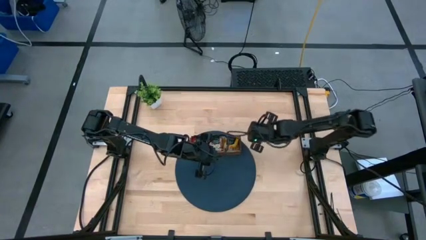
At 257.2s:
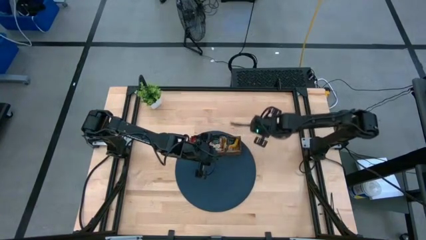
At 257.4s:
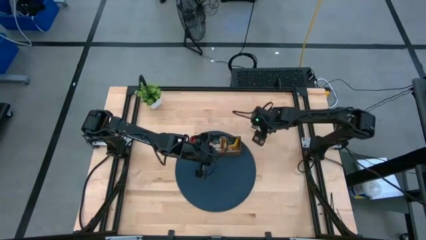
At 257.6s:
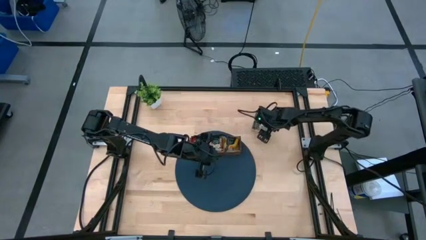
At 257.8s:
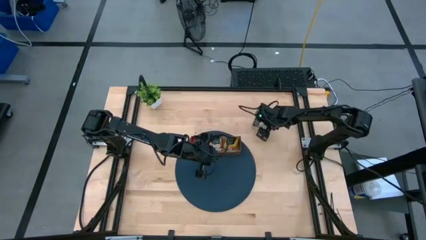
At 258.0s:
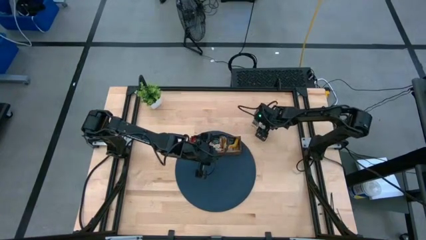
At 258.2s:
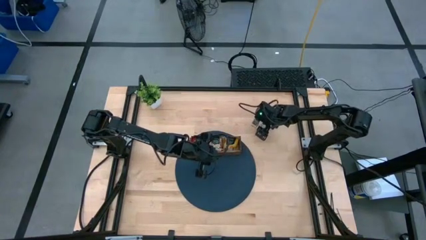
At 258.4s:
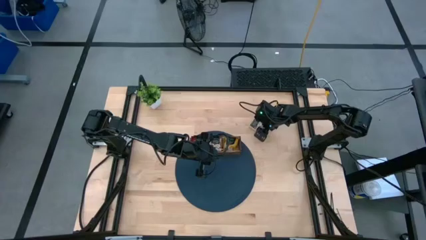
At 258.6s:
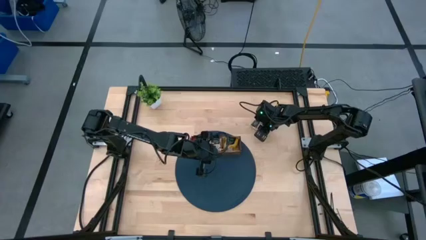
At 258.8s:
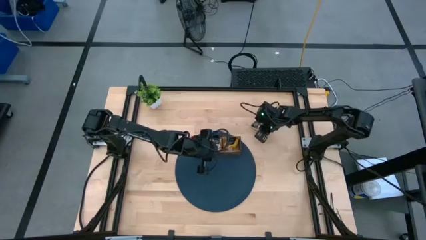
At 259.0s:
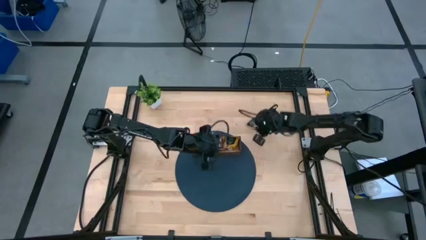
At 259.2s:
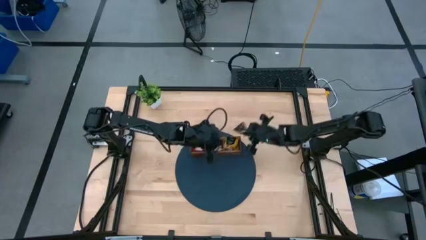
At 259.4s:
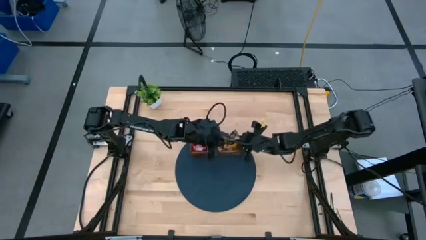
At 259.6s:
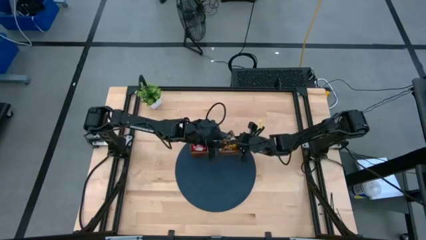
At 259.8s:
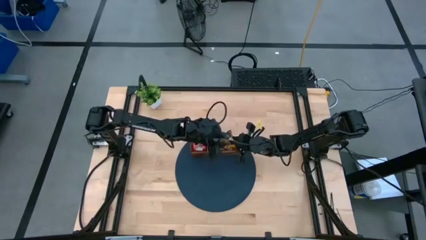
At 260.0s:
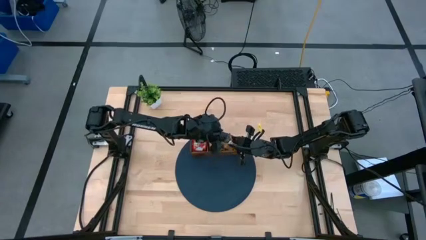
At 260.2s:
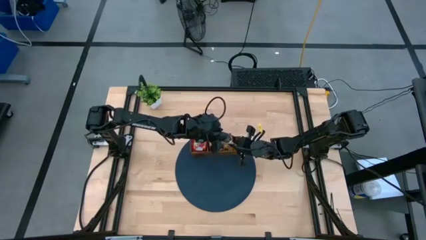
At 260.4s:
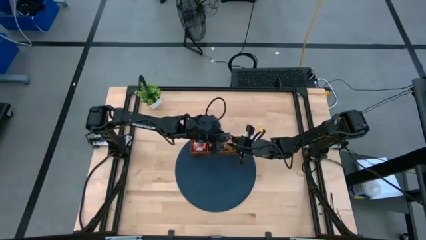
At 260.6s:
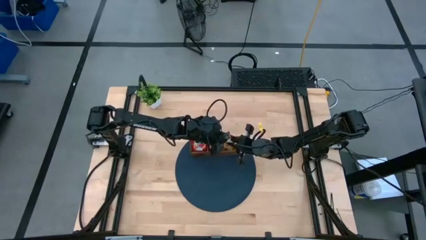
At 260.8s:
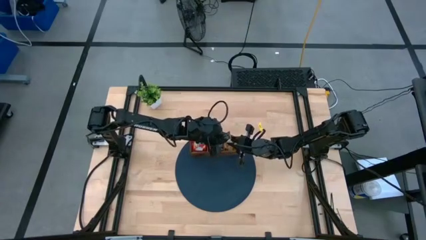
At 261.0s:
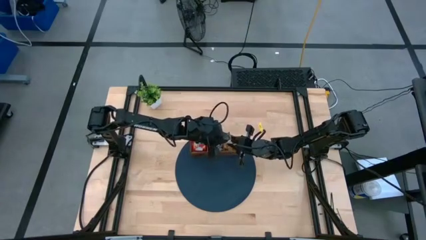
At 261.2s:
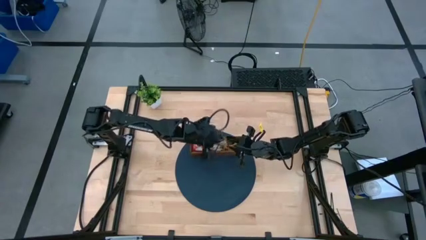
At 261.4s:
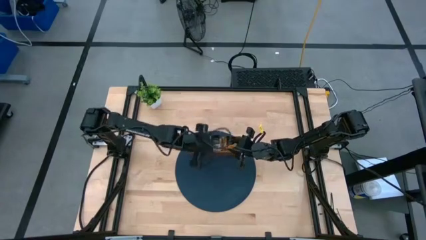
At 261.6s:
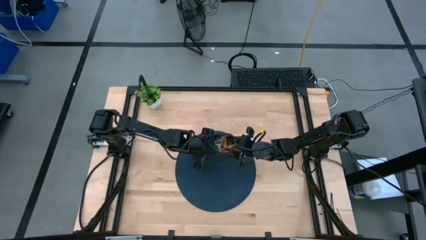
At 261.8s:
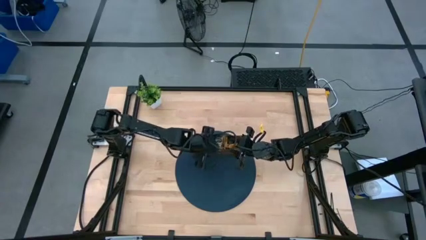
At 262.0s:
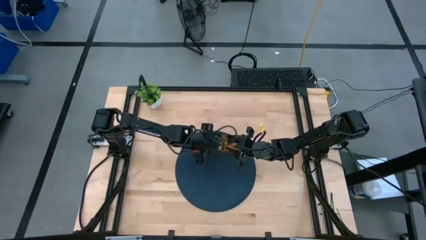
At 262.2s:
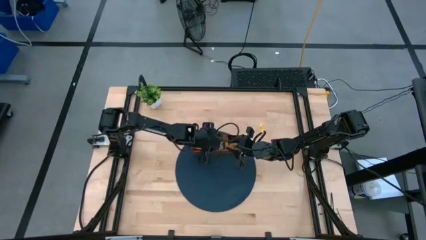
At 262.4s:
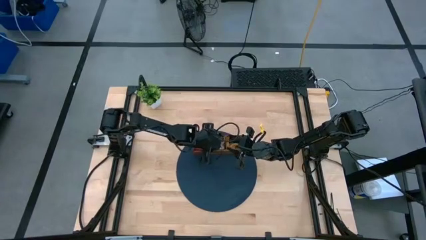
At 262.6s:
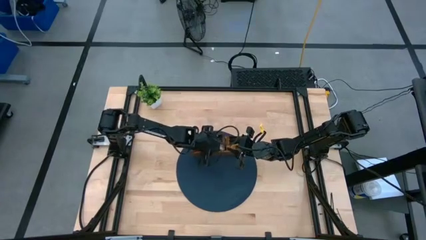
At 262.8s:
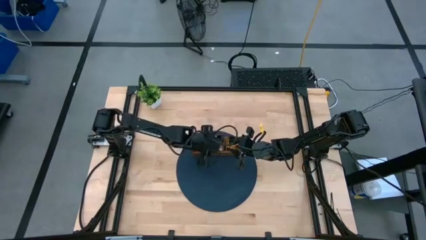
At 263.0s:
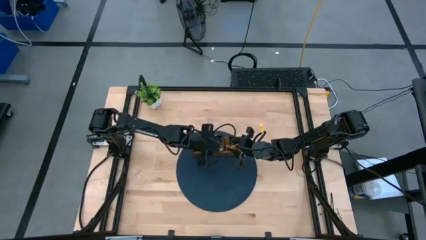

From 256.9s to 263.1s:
Task: Pick & Place Tea
Put the brown tea bag into the middle section of the wooden organizer

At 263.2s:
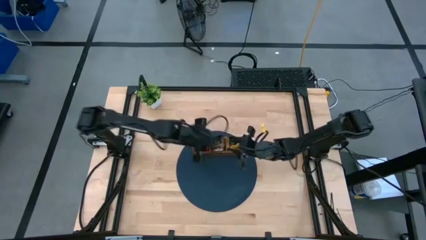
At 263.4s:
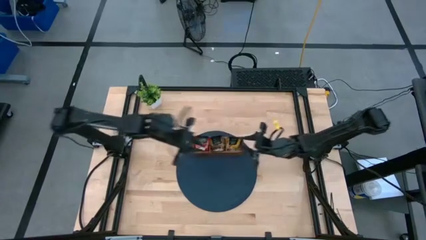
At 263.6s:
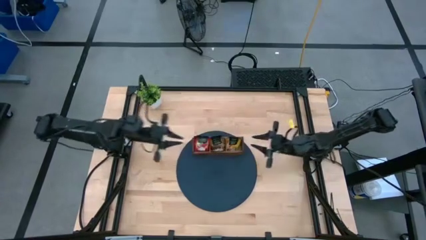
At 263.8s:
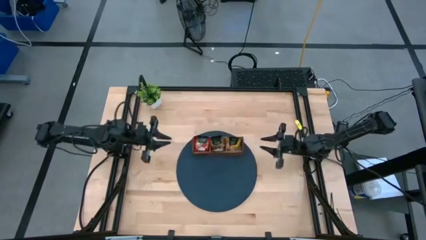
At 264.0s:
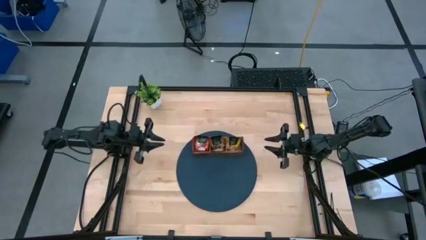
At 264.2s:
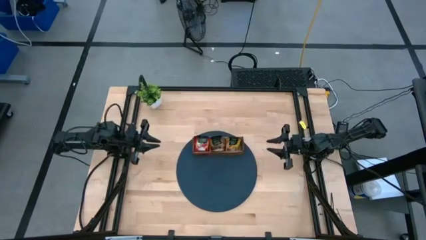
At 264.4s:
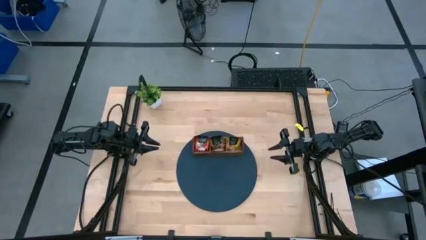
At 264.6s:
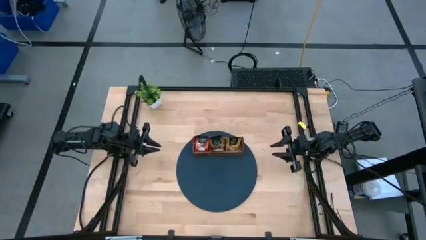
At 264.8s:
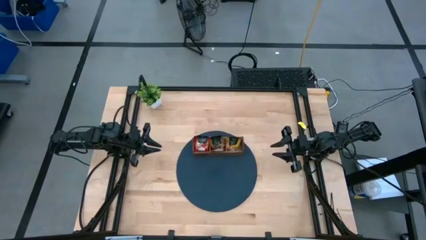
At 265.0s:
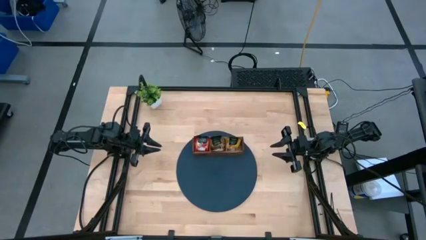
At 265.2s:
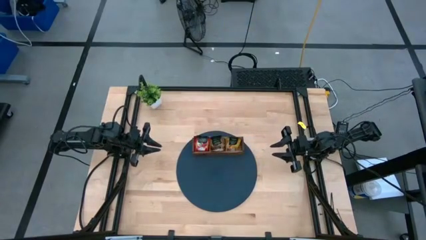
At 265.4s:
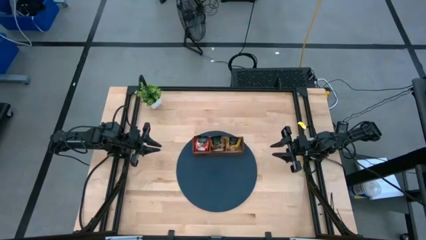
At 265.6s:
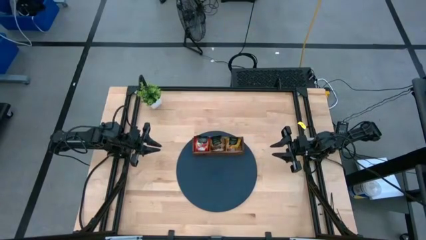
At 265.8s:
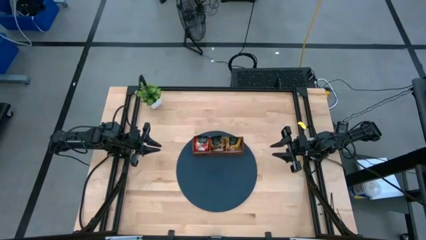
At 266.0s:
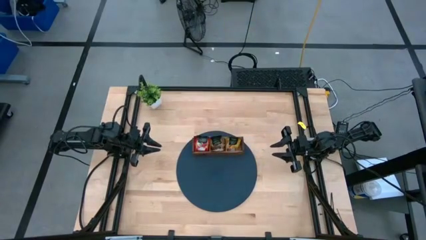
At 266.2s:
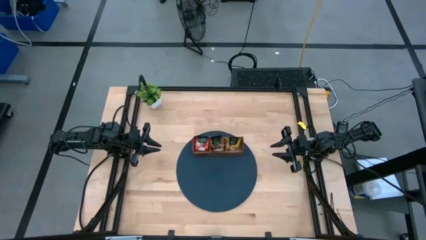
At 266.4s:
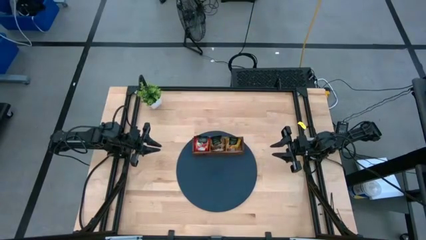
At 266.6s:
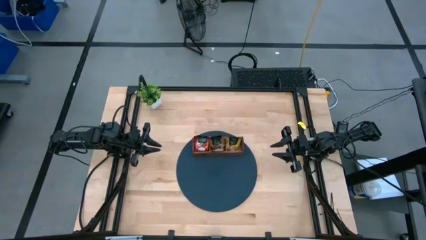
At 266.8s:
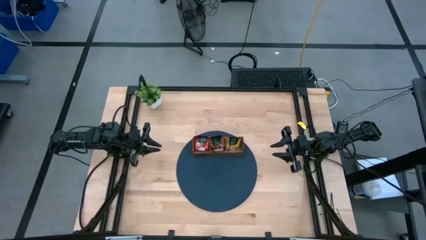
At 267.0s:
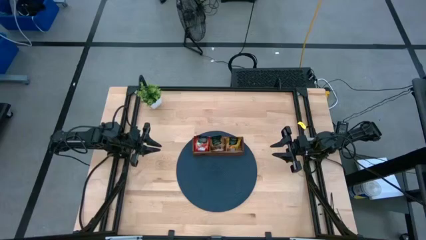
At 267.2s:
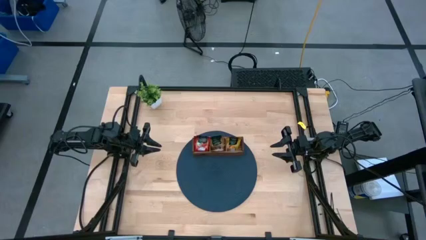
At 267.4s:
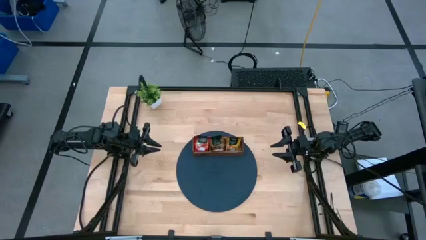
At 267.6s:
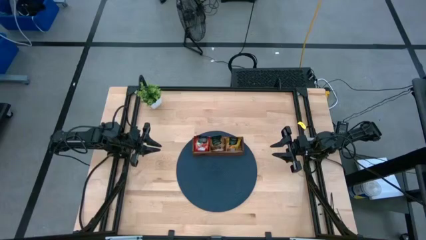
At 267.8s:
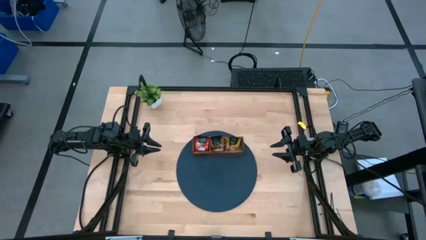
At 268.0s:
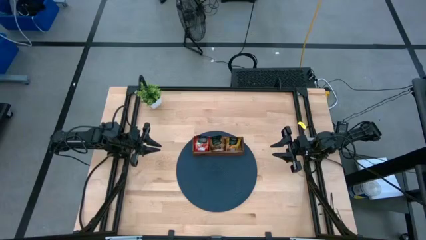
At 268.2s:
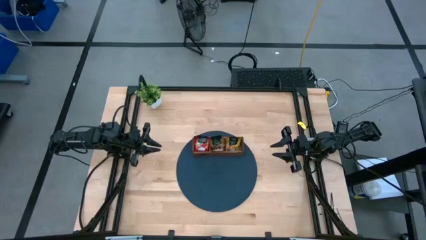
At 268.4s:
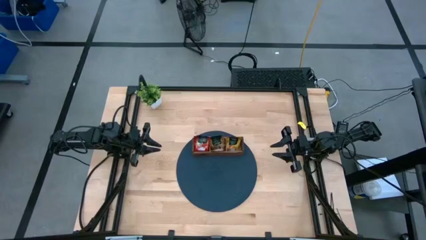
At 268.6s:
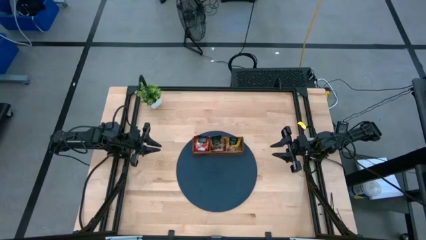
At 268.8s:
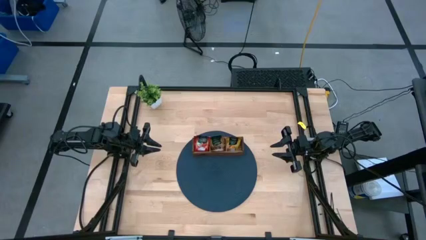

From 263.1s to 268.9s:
Return to Home Position
